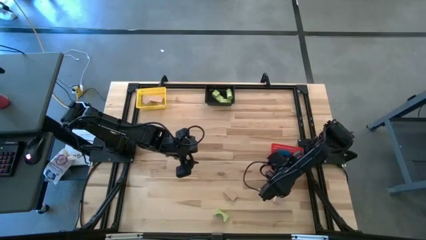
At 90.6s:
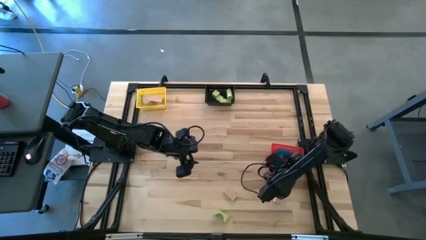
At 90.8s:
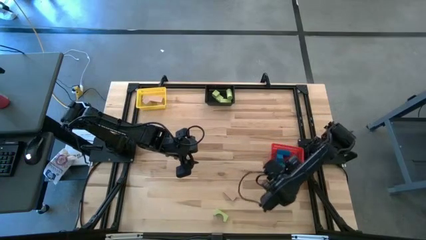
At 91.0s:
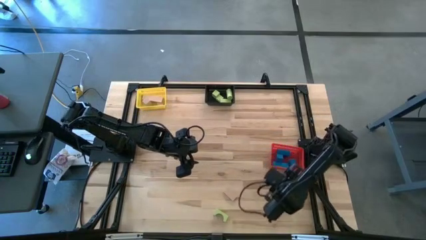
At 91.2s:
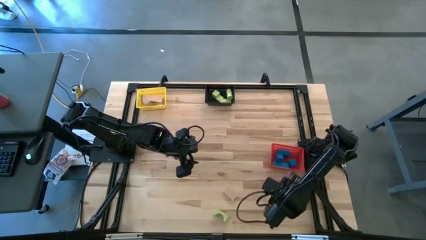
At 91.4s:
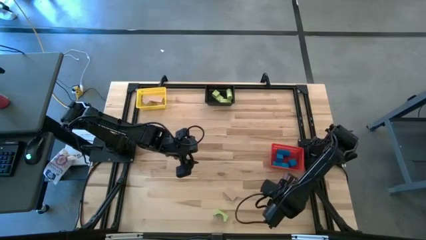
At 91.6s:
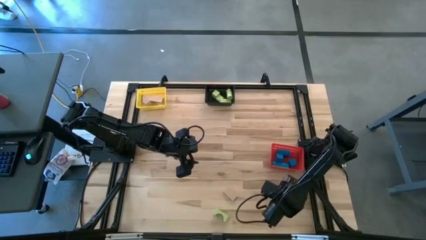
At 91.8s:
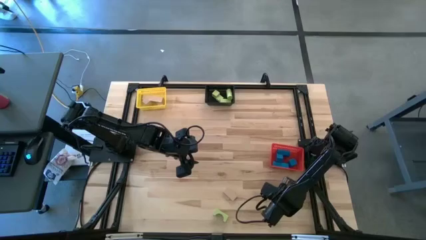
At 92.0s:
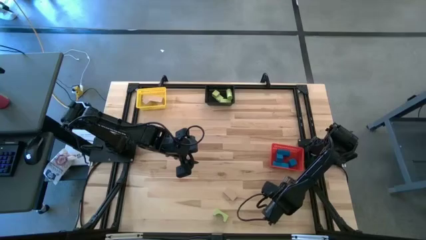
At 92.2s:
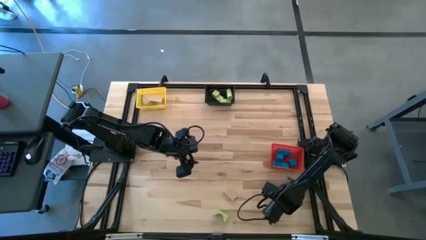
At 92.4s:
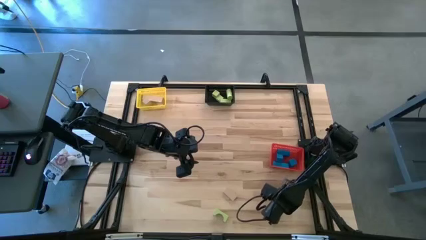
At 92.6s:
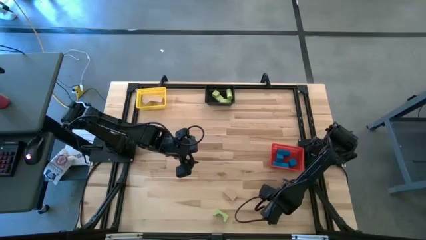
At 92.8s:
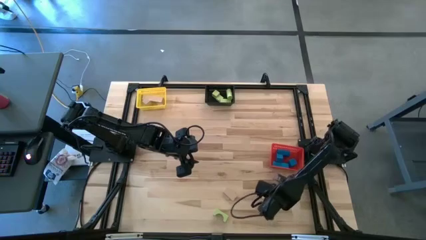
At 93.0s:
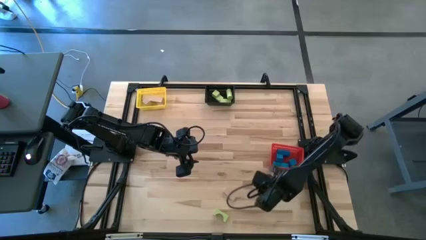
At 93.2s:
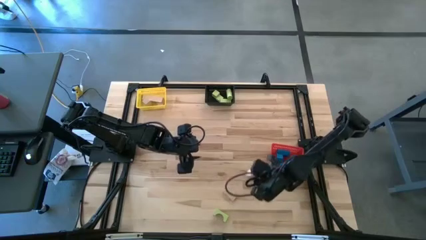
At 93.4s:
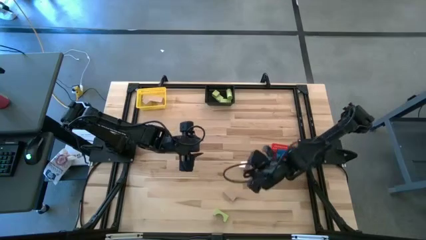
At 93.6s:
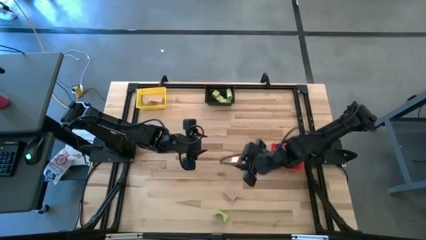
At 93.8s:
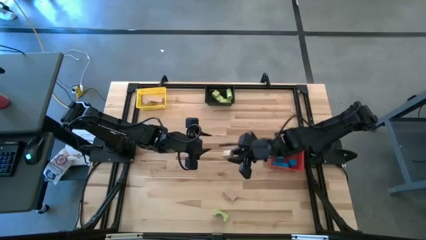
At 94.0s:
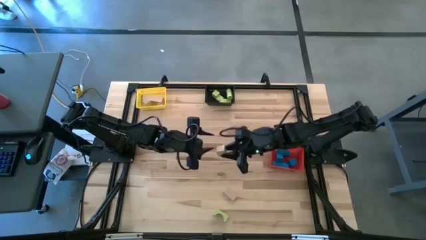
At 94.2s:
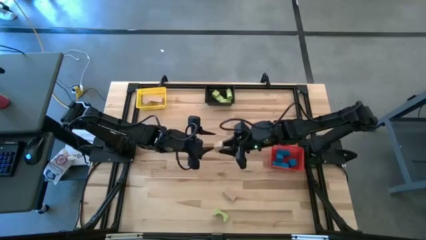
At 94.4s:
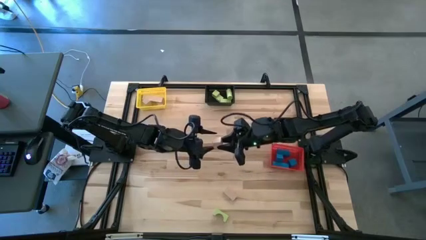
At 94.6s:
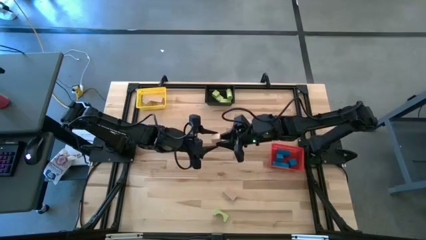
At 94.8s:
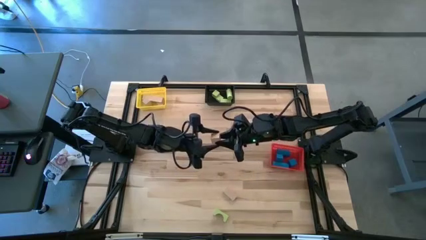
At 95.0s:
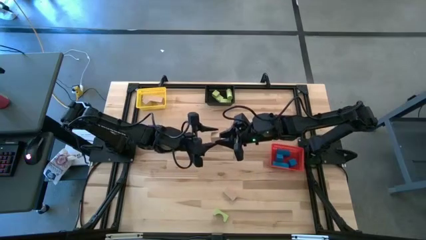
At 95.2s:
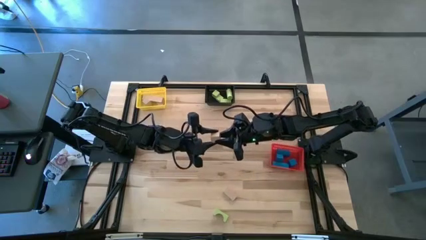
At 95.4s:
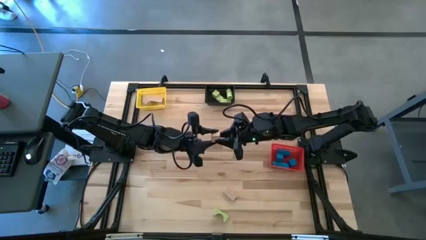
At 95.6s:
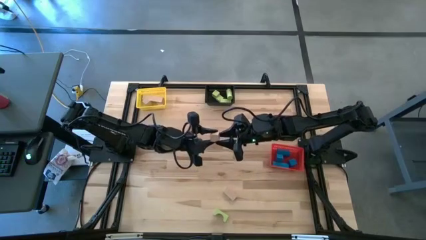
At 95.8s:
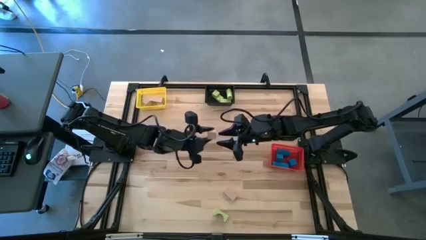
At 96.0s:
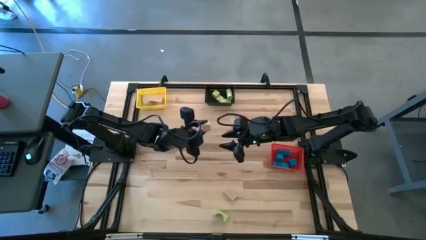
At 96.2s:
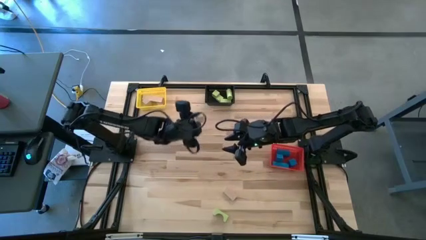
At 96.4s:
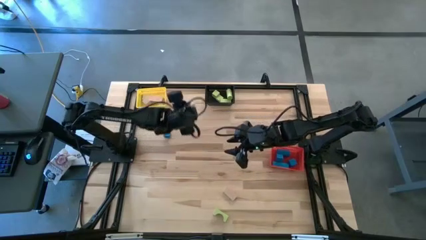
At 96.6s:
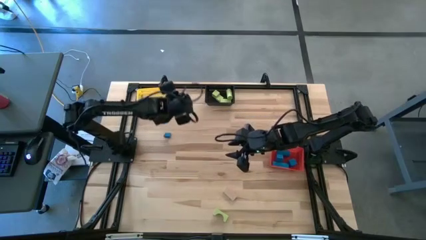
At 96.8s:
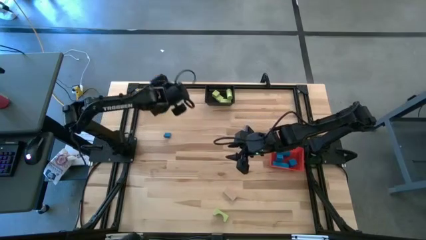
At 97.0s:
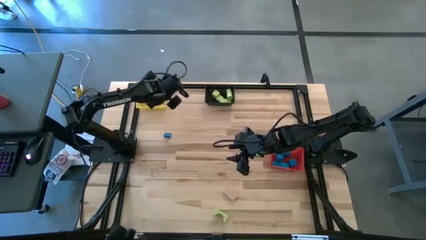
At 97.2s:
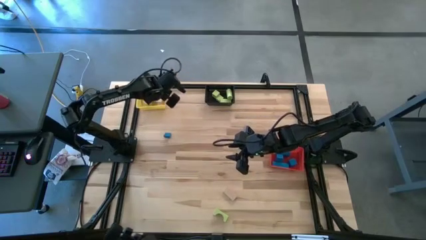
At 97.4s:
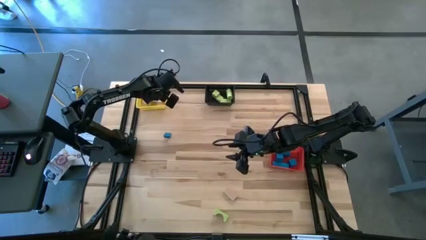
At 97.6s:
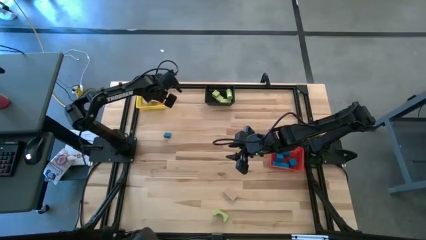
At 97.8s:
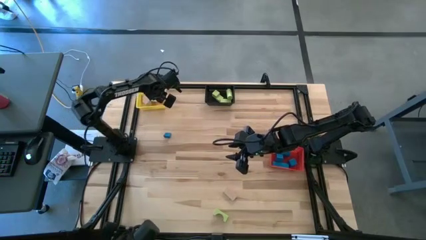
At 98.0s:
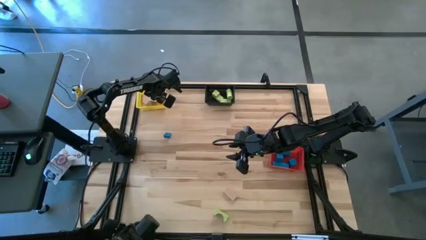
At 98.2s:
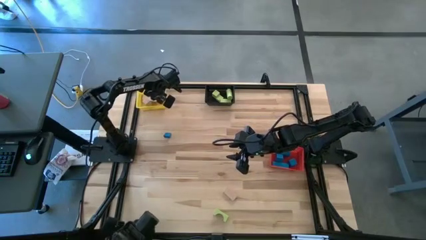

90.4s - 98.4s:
Task: Sort & place blocks by color
Put the brown block into the yellow basket

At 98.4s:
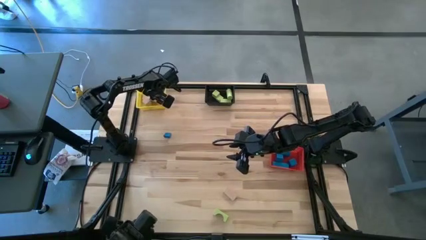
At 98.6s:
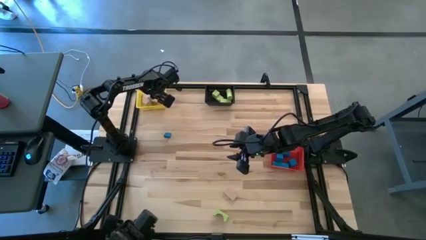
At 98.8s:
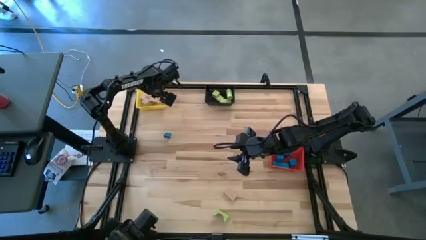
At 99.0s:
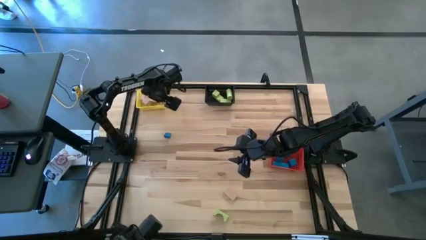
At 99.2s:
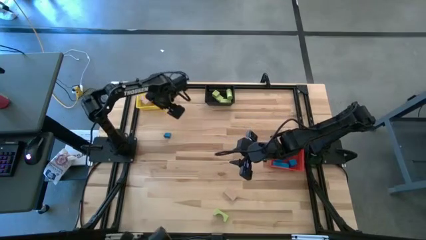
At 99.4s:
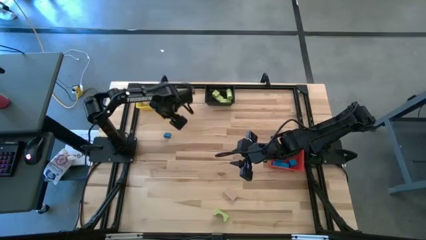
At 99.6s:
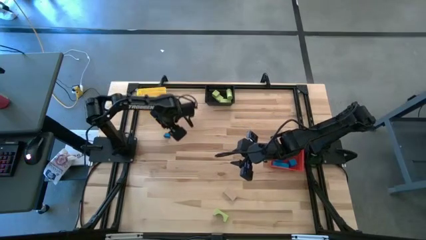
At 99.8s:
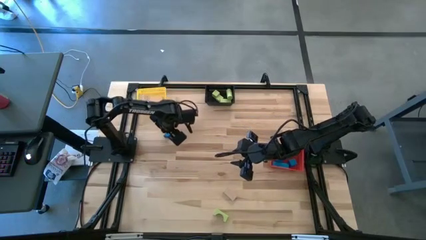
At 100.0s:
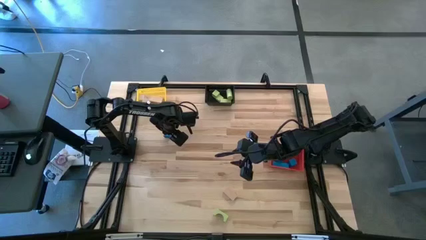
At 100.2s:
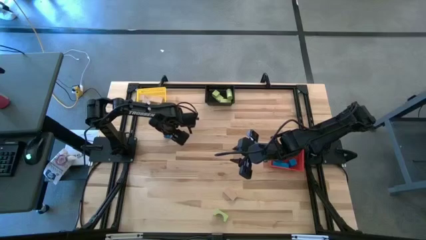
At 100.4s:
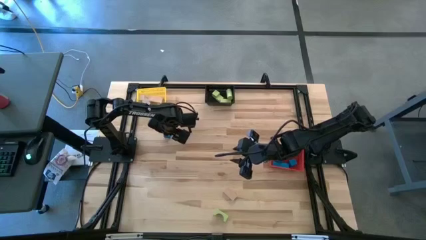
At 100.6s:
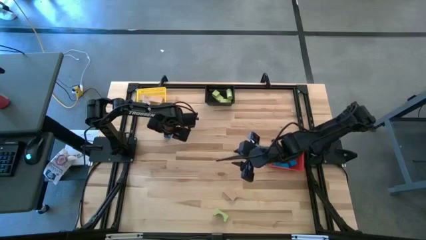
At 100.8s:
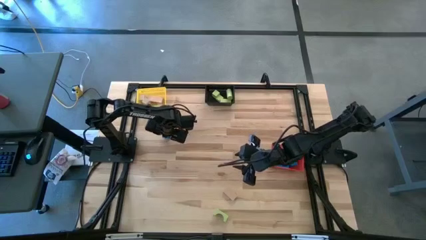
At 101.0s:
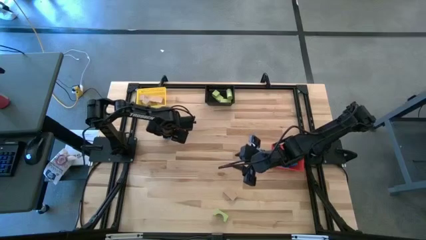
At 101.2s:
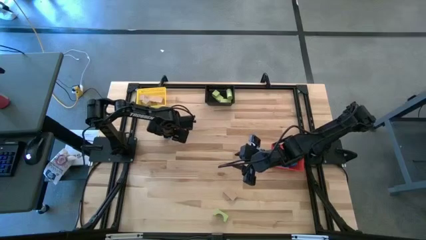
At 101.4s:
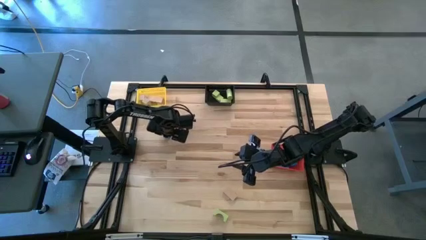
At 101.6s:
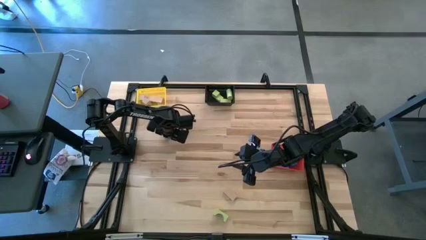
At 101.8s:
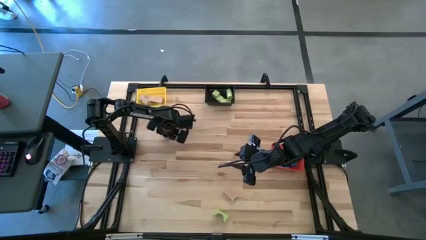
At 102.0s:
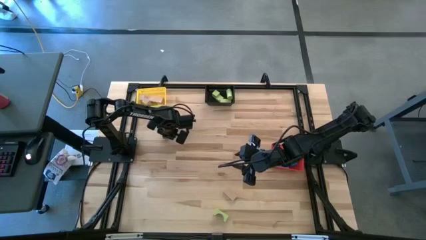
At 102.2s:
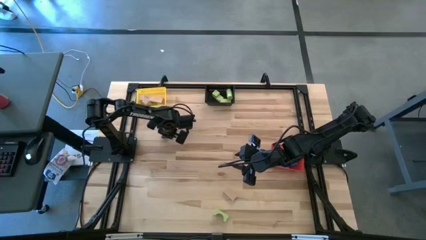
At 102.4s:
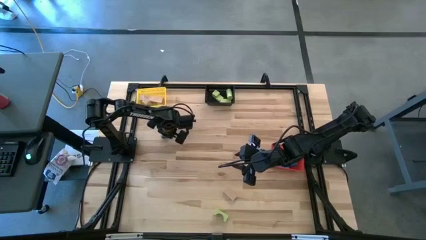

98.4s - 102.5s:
Put the blue block into the red basket

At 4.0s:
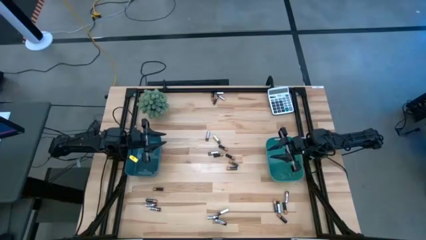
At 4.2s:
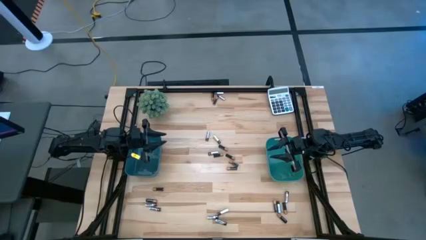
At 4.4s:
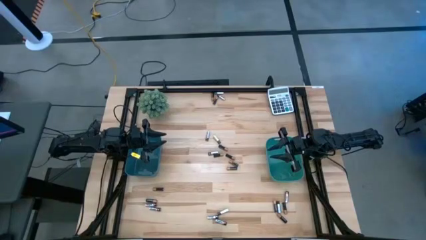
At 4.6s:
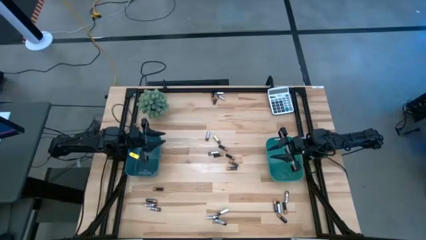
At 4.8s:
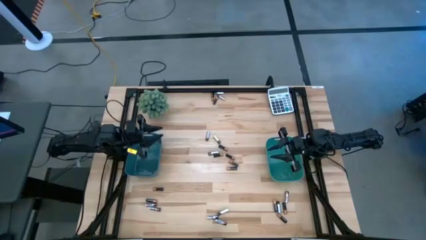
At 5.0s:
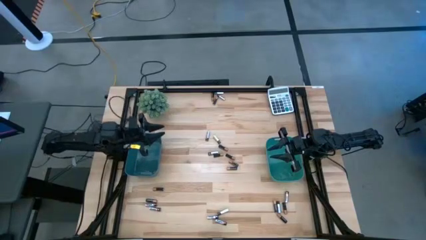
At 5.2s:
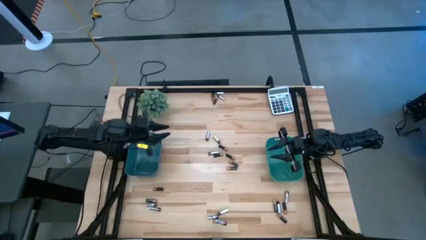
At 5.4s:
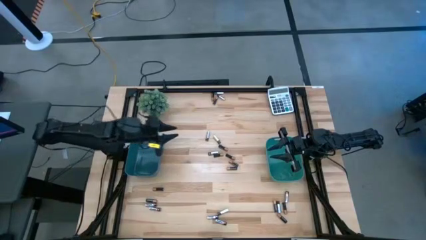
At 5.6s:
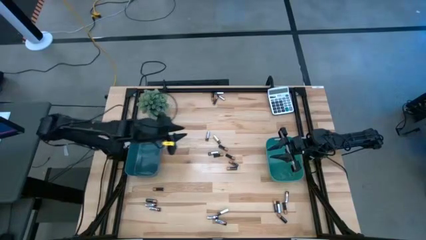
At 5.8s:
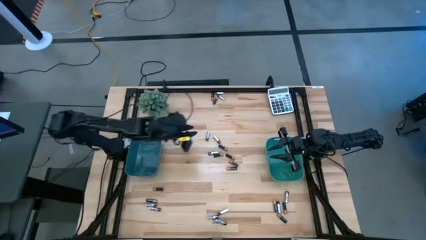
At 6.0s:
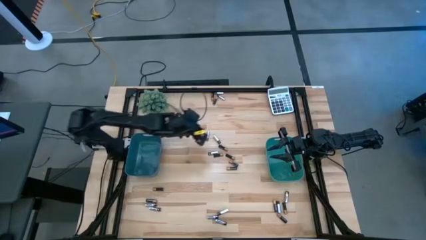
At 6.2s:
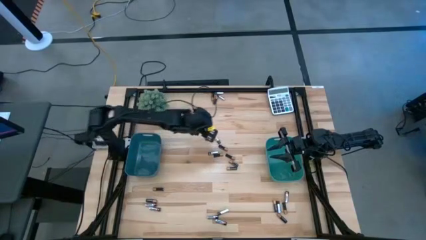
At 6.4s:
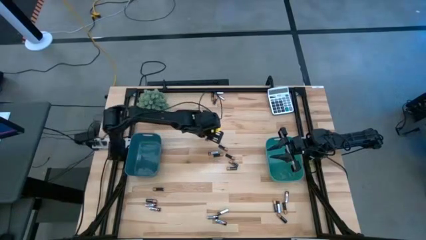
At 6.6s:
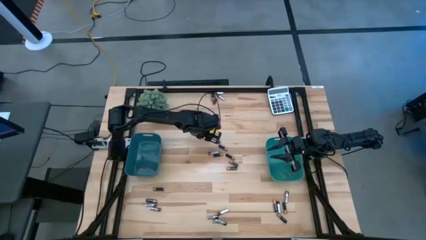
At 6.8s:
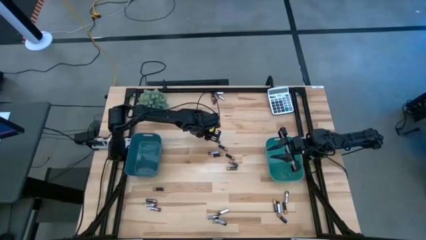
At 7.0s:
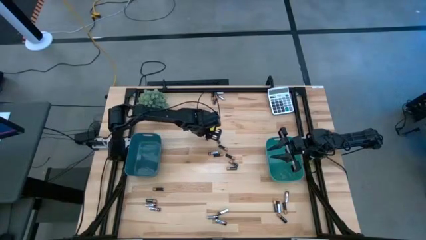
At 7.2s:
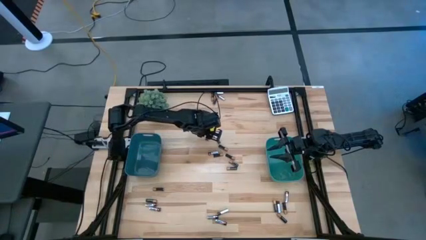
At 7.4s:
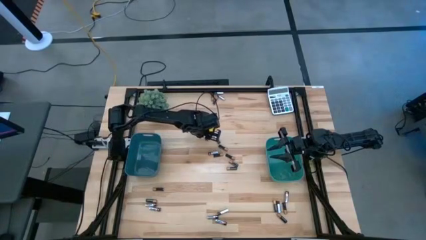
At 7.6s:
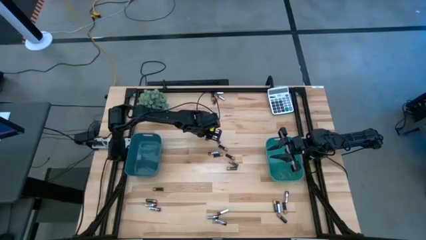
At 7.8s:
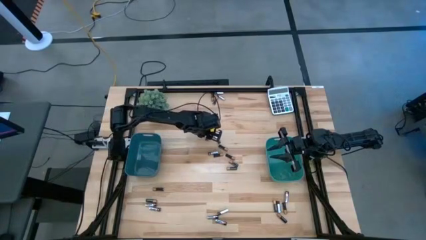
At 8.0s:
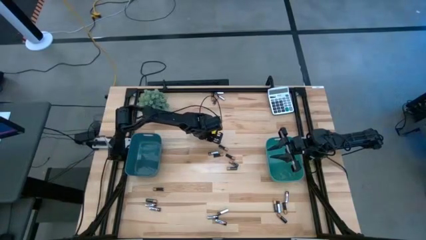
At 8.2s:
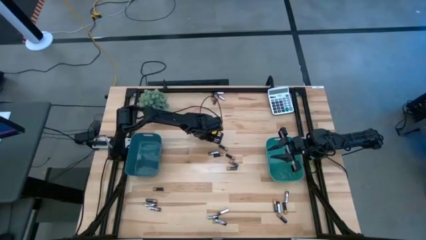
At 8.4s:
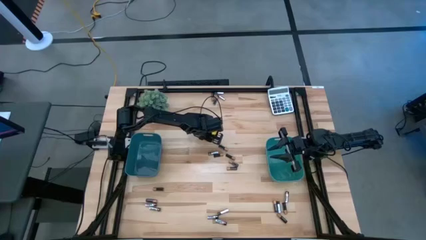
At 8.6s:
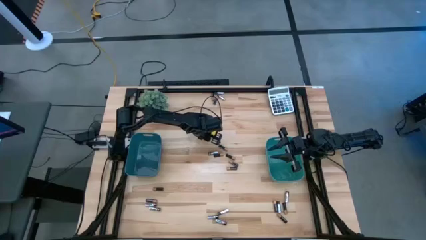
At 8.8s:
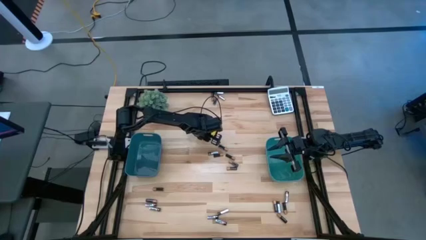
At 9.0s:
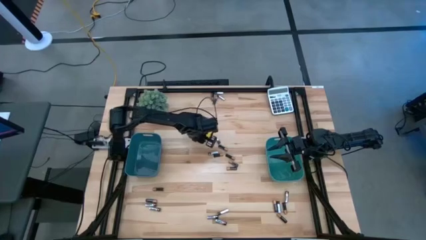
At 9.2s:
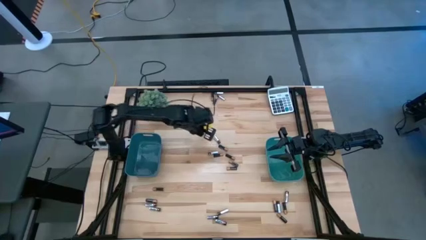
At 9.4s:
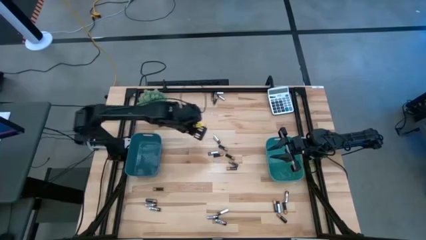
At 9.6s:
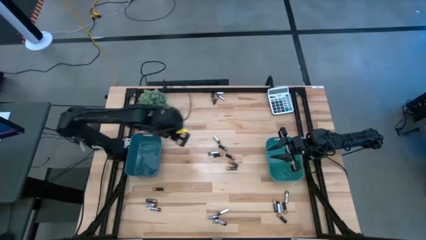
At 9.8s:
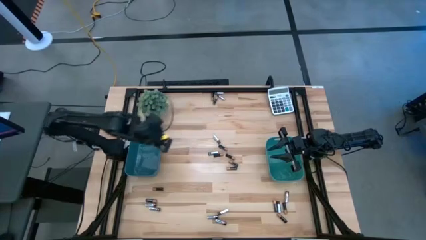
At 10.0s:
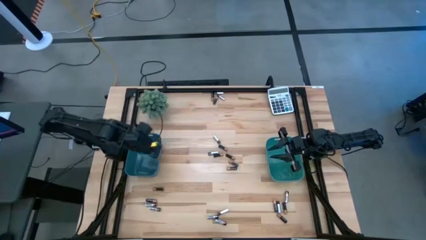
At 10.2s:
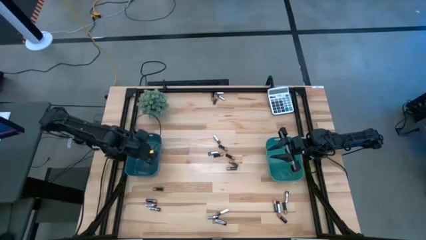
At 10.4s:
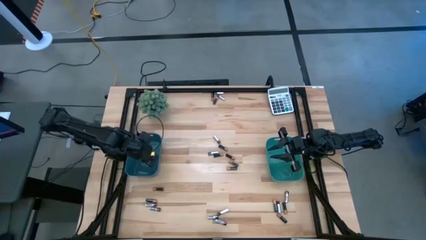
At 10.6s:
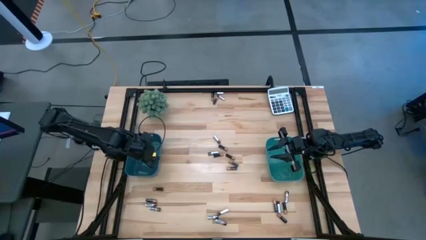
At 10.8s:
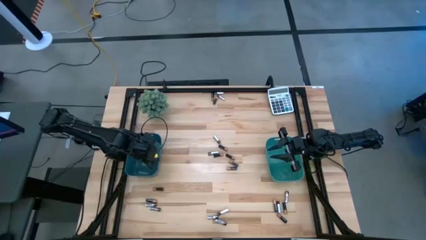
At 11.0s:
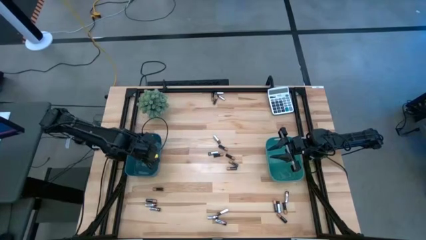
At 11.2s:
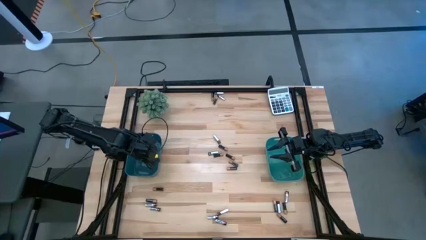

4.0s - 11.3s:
Task: Sort batteries
Put the silver battery into the blue bin
